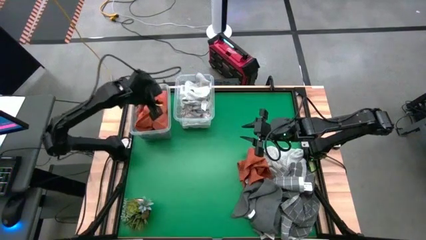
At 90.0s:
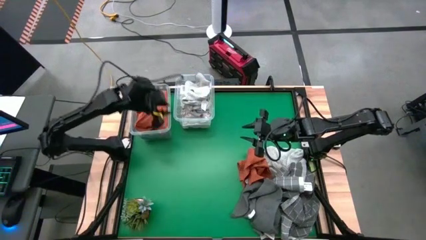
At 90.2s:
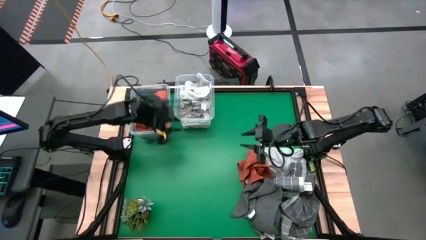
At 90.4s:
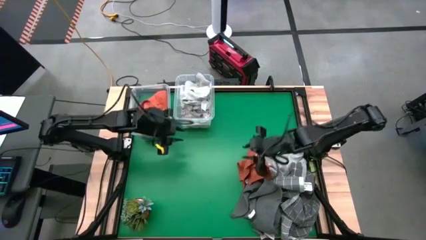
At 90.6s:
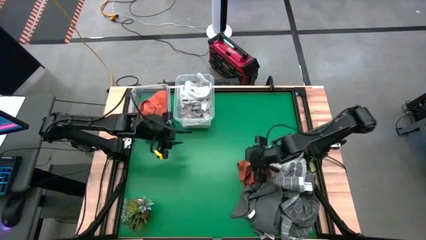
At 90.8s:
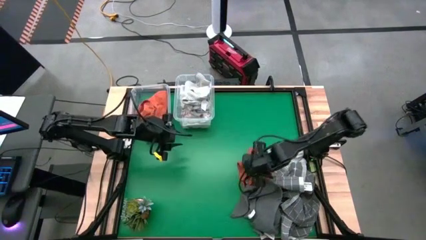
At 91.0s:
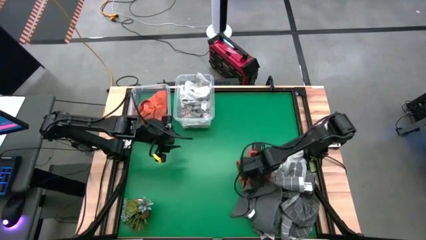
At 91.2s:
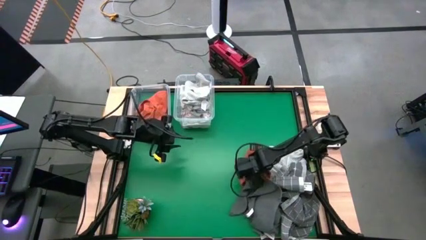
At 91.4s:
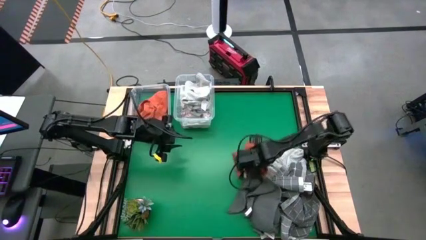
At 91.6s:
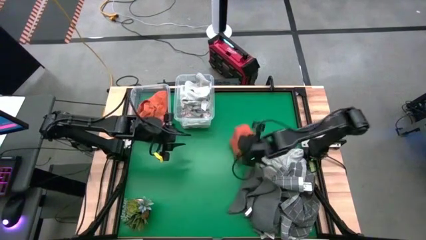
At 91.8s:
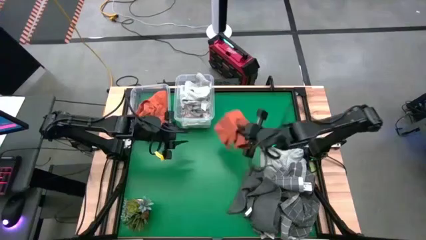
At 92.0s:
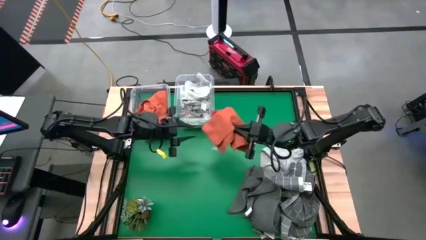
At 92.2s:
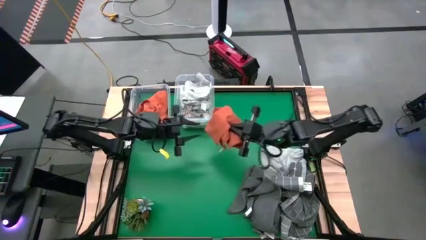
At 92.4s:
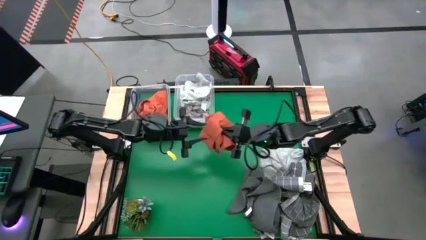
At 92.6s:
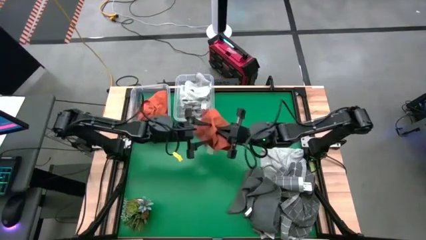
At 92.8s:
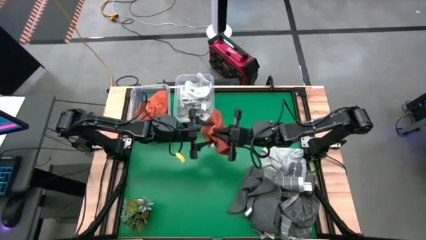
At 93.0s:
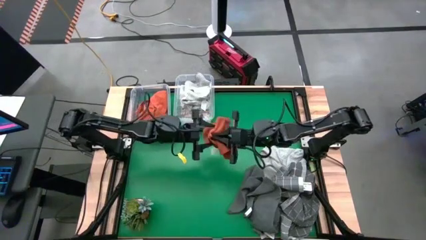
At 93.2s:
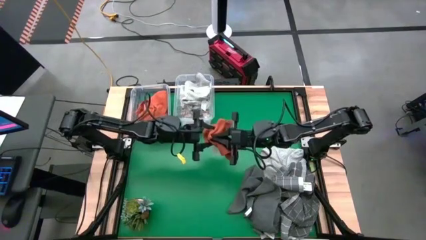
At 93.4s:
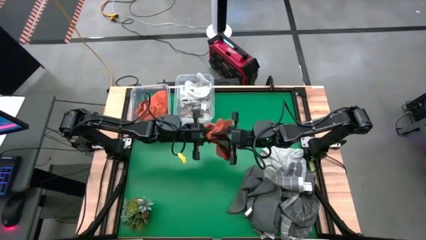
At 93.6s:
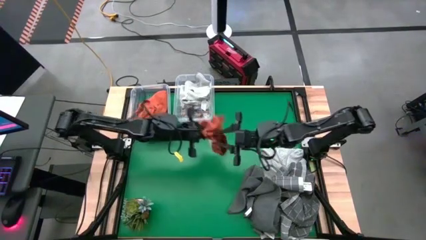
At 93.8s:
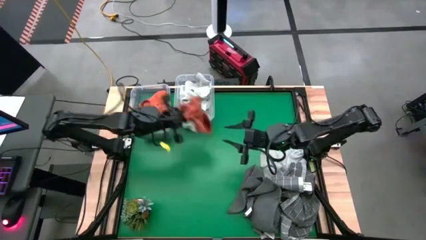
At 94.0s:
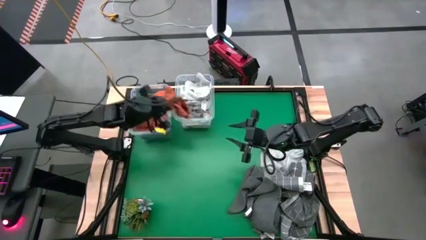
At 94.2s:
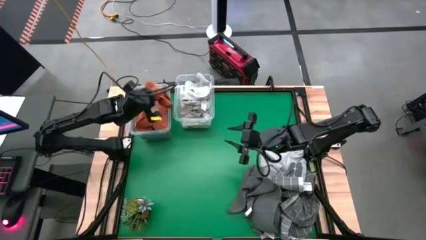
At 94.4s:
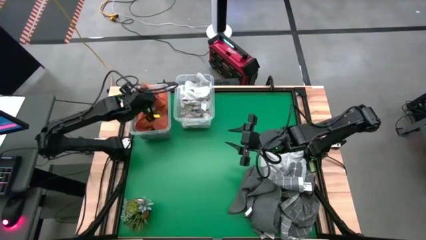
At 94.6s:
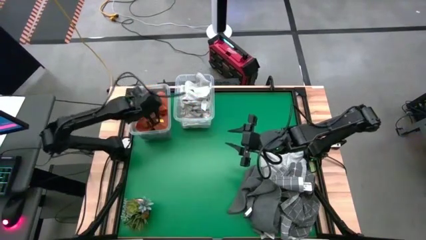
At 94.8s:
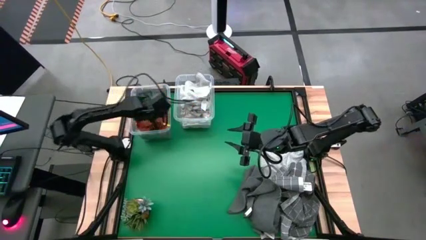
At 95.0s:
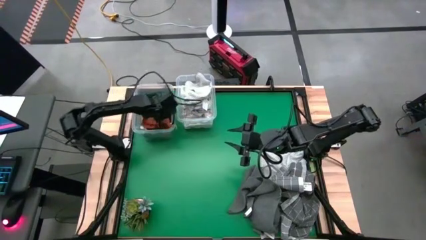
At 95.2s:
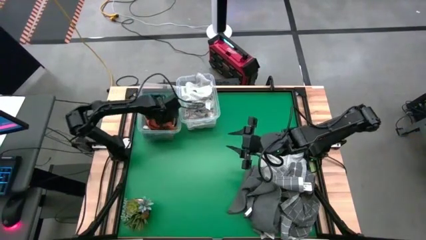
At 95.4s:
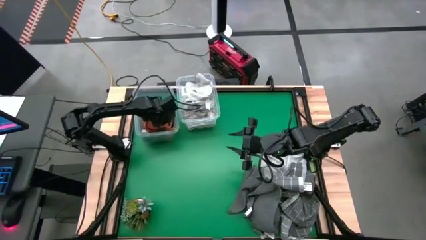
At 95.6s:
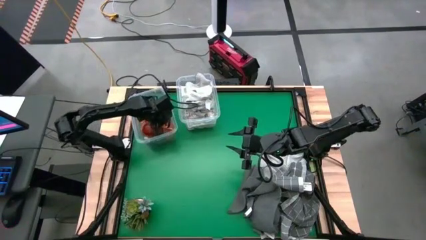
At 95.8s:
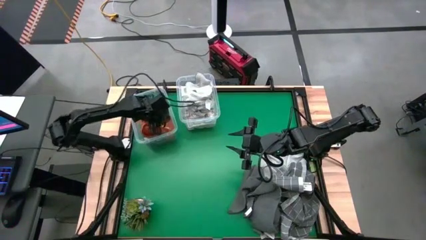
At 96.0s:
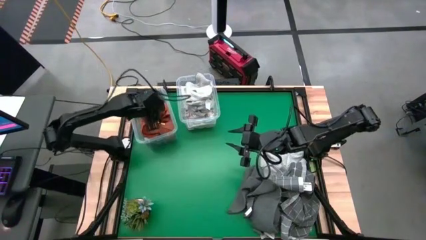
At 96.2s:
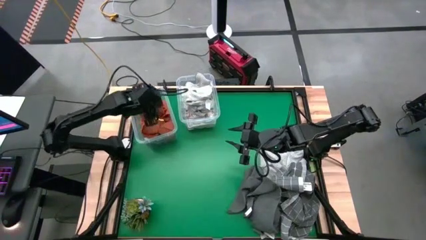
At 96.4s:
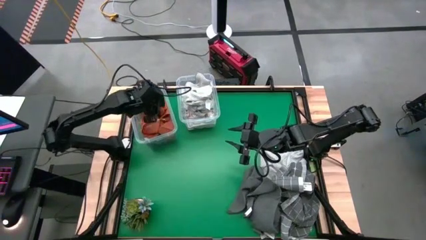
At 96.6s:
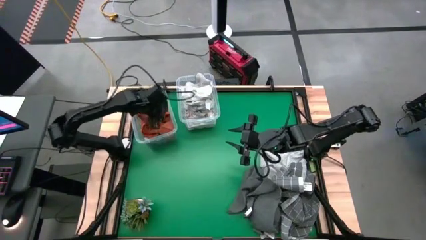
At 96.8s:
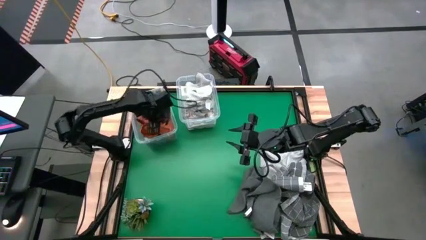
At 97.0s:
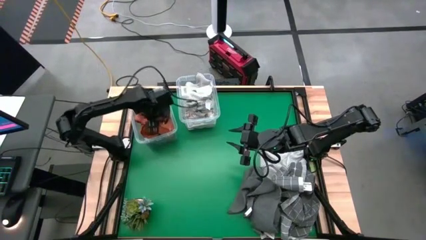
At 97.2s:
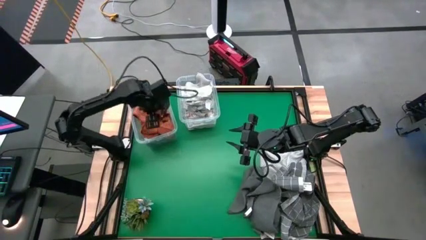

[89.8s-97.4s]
Task: Sort towels by color in basket
Put the orange towel into the left transparent bin

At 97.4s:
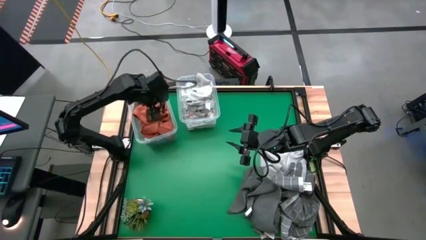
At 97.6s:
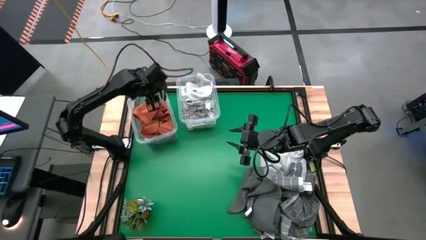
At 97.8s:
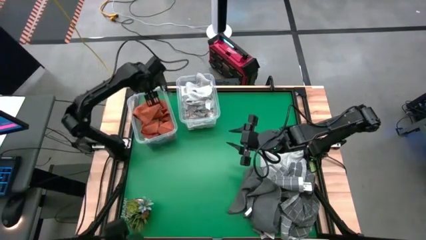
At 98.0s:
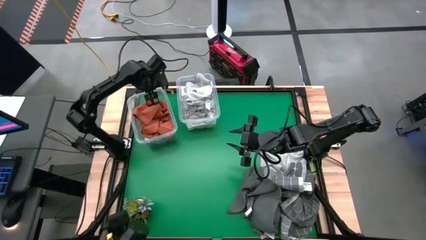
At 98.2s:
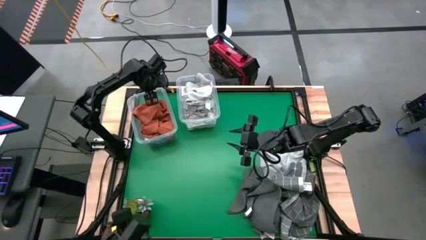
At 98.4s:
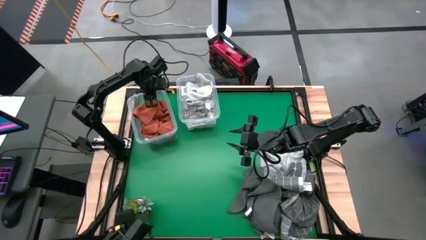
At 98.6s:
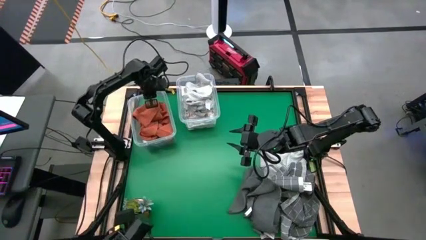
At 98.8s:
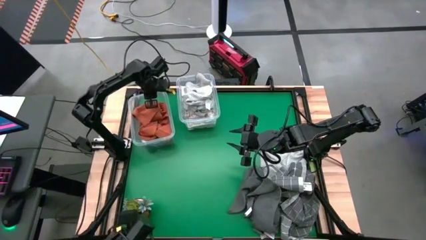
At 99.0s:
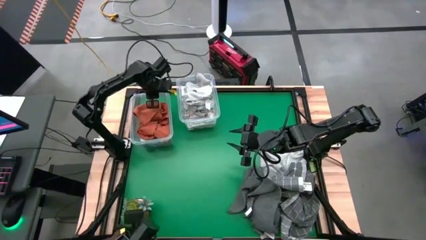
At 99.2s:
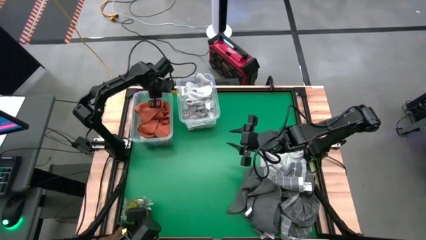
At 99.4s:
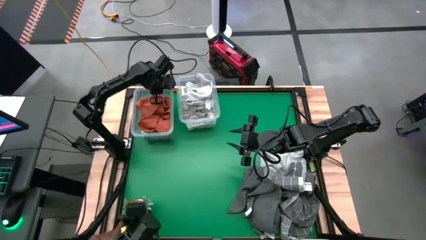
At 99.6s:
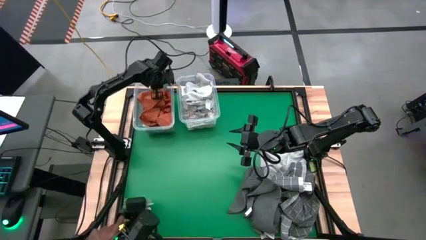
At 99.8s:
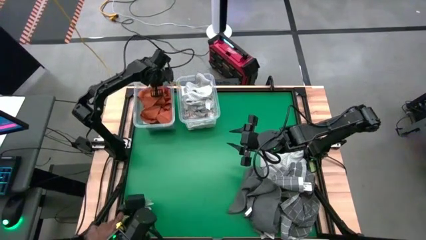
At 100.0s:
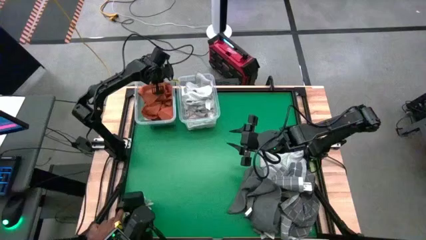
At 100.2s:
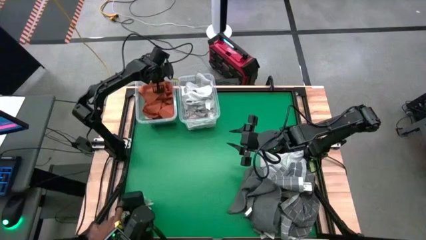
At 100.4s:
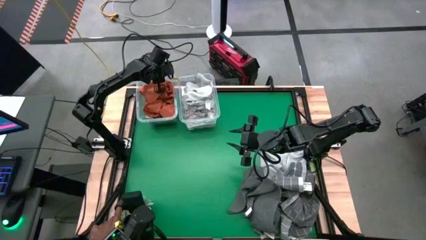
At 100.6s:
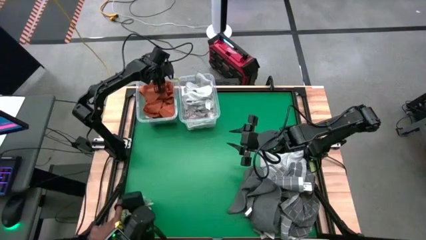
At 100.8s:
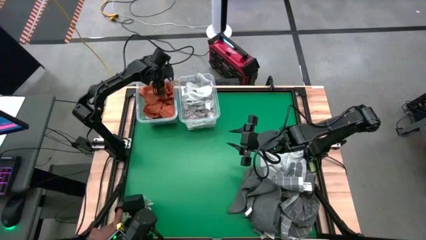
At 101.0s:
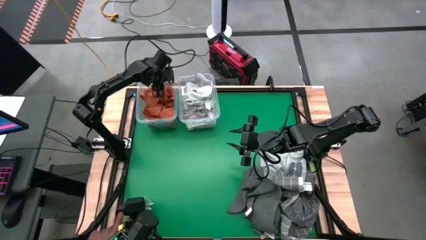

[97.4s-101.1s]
Adjust the left transparent bin

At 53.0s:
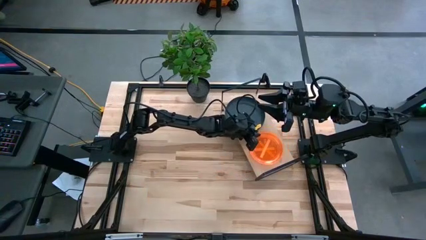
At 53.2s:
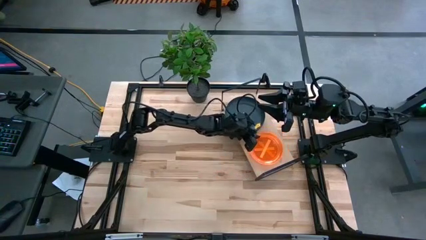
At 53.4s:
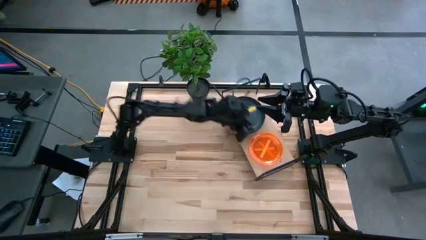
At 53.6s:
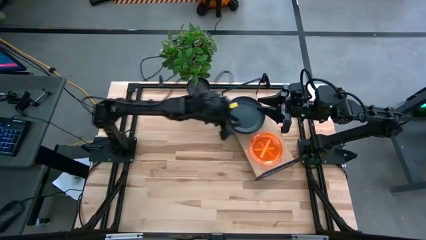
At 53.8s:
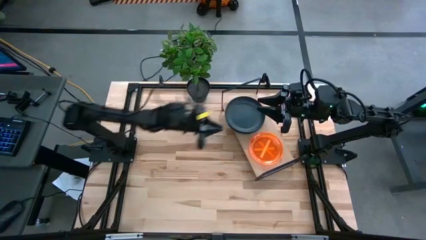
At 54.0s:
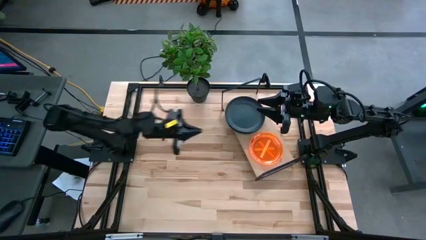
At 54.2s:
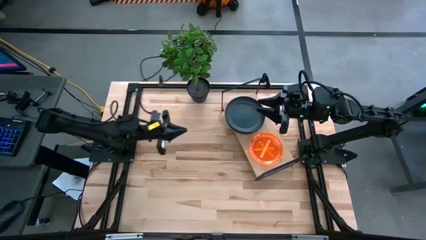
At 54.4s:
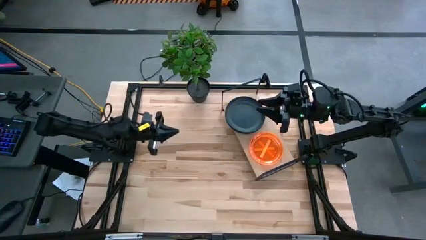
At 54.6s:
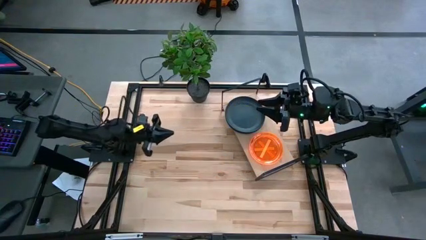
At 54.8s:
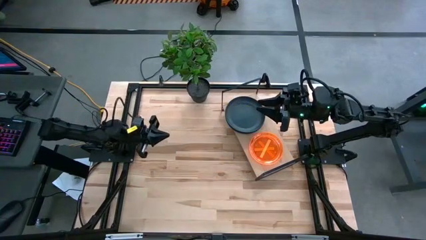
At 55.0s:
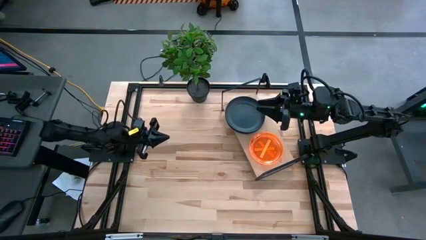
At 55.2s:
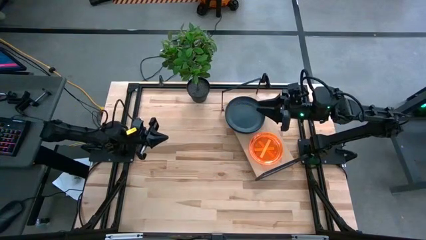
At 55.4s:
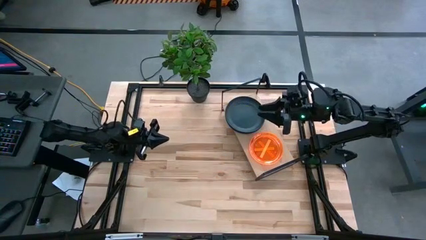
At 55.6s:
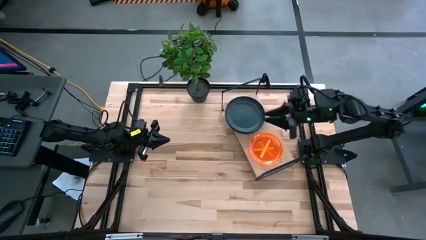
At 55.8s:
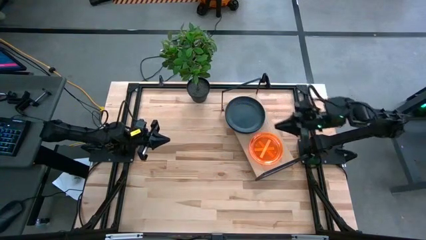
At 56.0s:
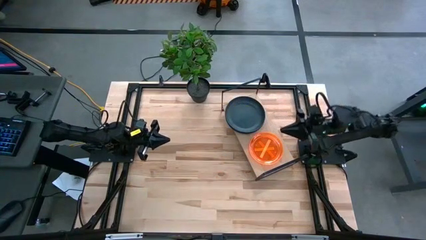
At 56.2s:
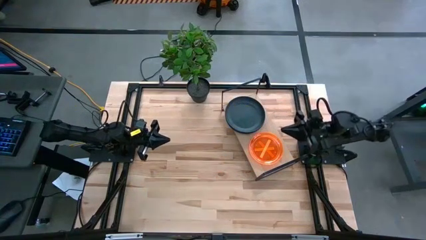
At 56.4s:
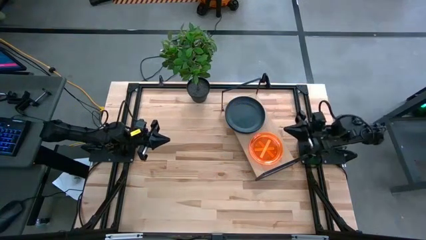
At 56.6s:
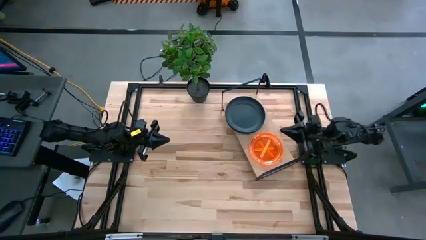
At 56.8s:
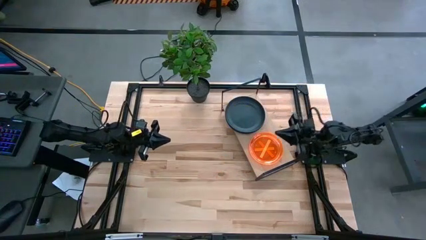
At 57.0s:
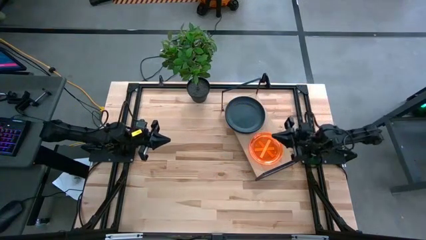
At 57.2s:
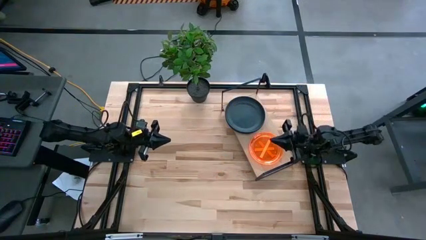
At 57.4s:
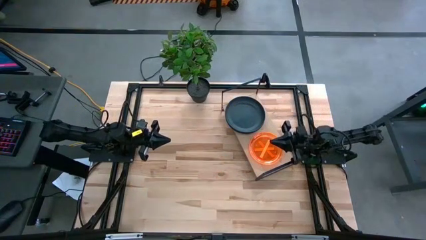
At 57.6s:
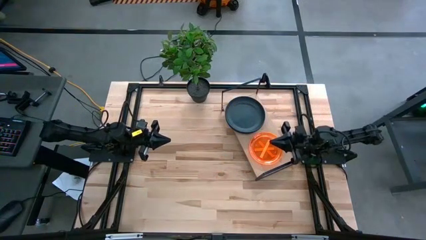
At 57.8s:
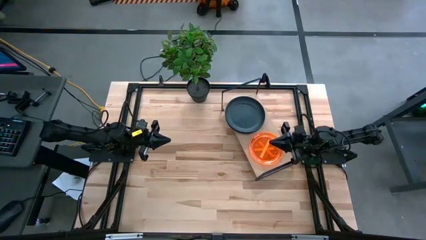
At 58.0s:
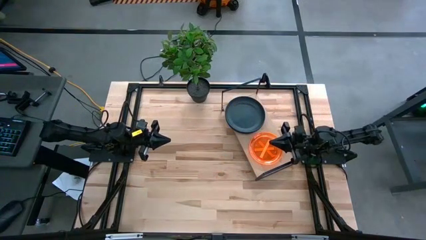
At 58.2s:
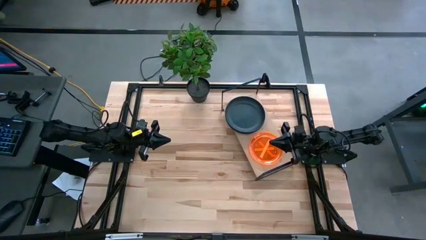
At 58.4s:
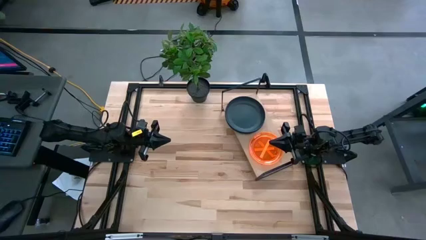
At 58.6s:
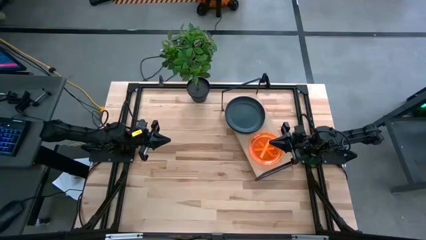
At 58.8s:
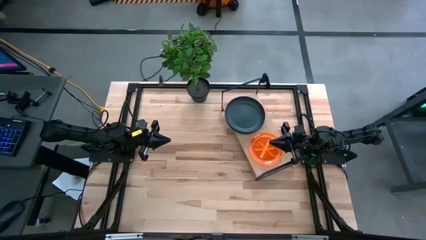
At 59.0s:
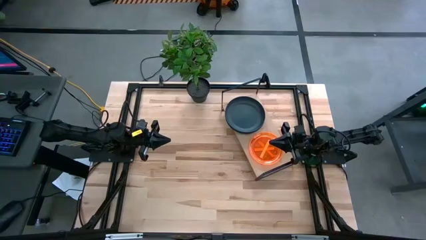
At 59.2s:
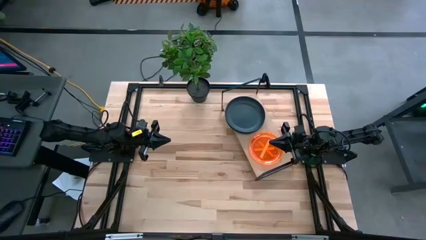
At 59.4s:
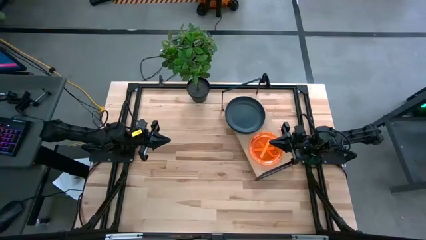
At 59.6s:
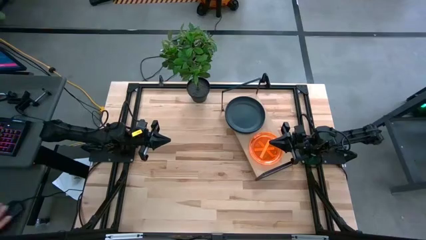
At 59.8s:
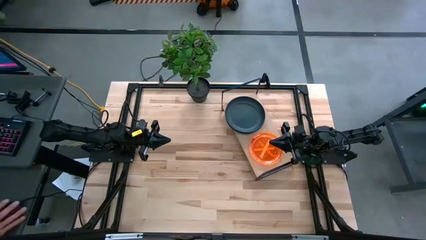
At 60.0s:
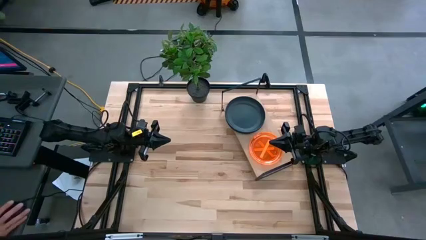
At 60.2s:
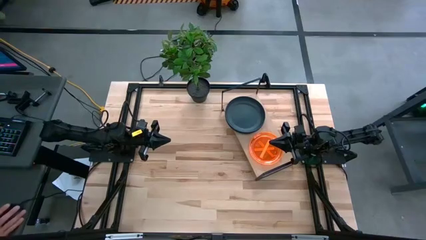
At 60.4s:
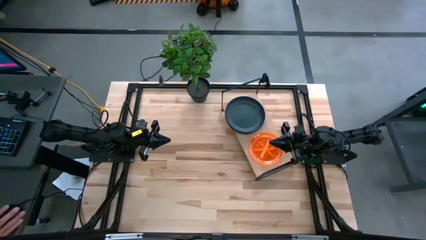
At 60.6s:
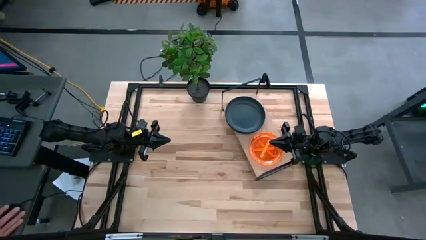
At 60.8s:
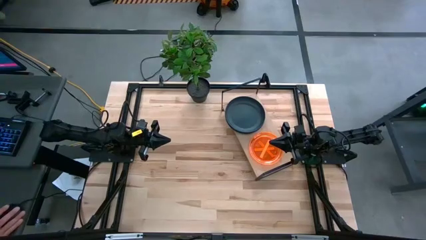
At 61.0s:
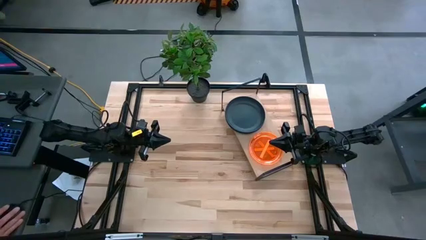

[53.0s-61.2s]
Task: Place and stack plates onto a shelf
Return to home position
